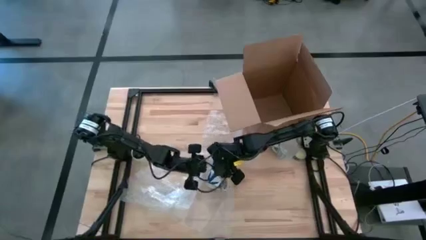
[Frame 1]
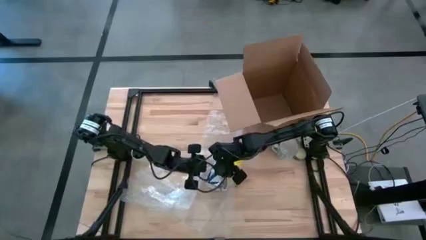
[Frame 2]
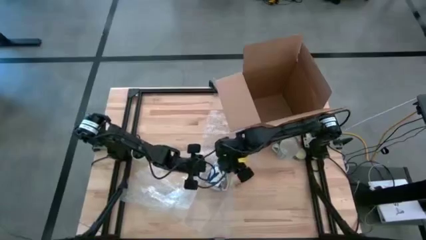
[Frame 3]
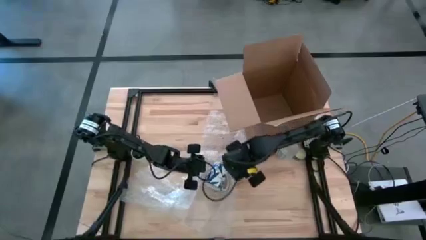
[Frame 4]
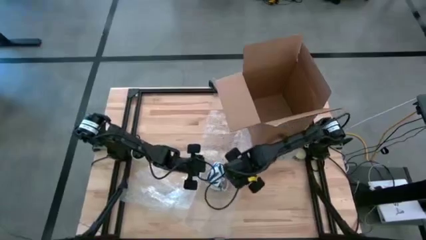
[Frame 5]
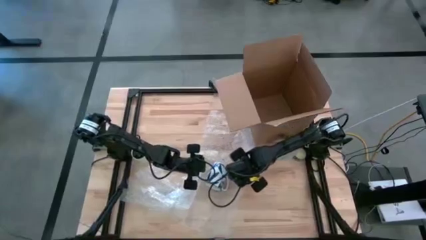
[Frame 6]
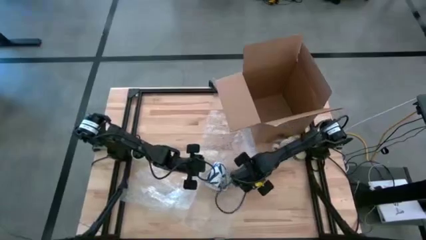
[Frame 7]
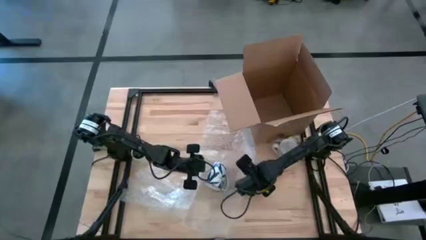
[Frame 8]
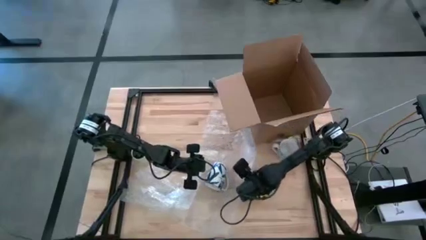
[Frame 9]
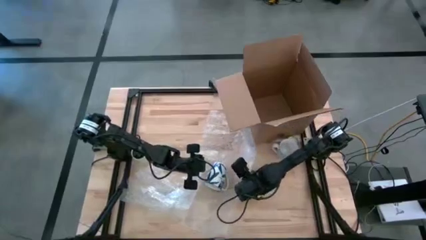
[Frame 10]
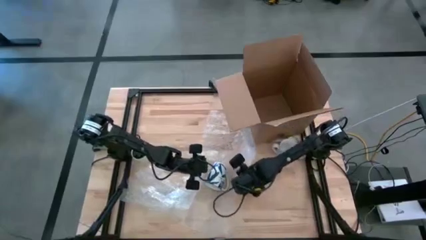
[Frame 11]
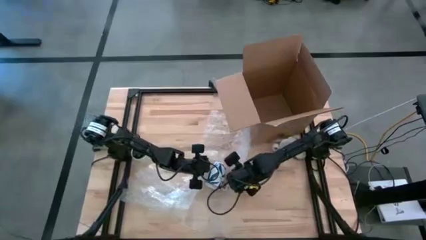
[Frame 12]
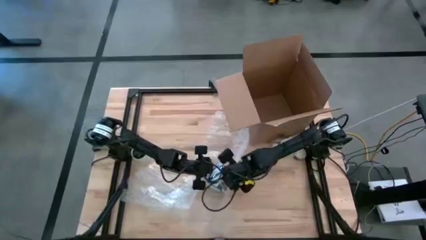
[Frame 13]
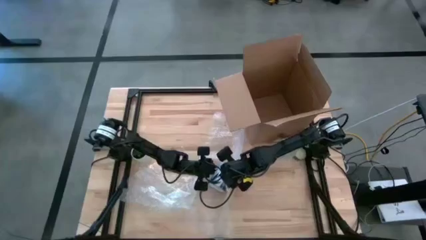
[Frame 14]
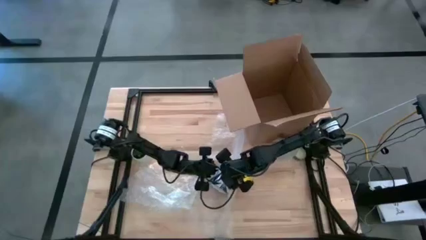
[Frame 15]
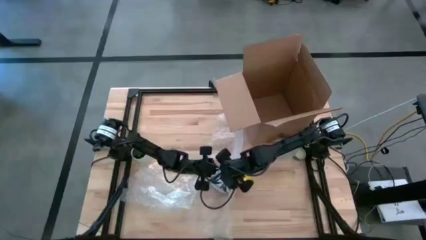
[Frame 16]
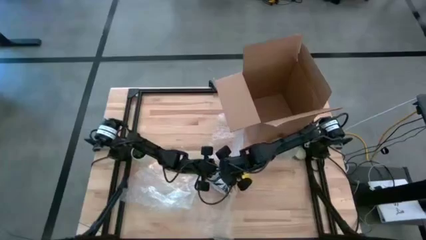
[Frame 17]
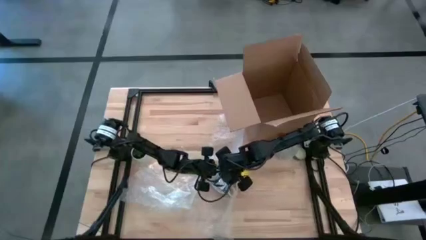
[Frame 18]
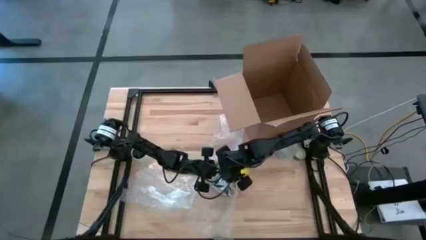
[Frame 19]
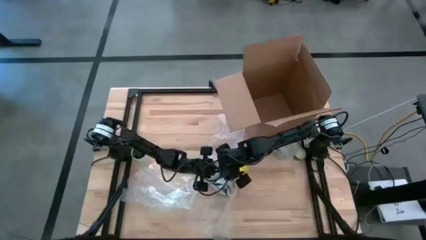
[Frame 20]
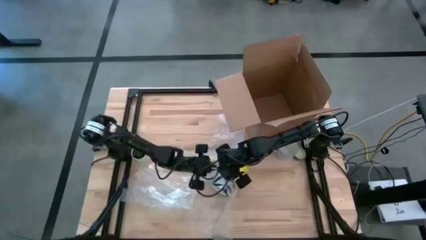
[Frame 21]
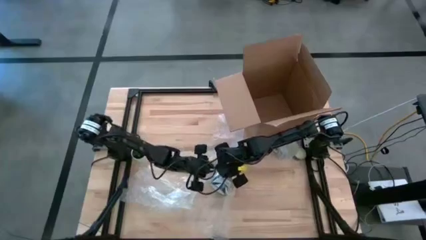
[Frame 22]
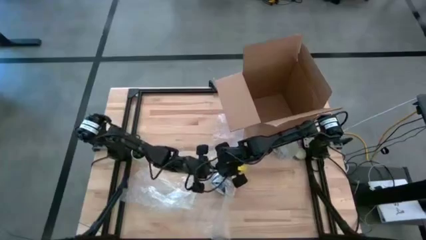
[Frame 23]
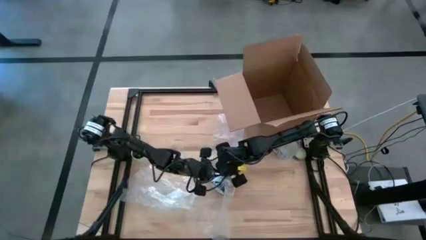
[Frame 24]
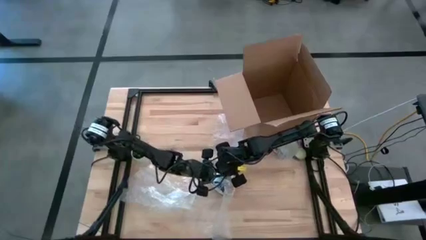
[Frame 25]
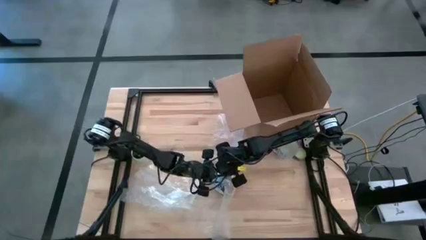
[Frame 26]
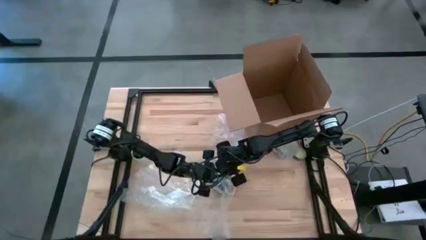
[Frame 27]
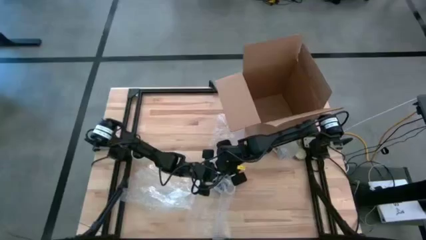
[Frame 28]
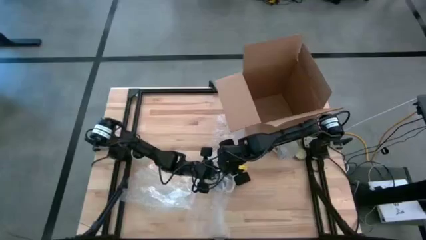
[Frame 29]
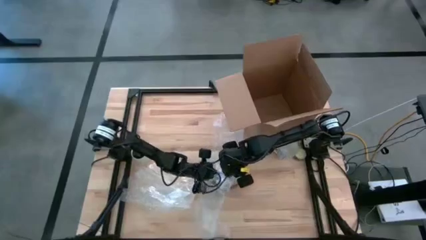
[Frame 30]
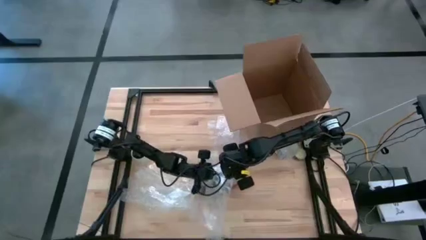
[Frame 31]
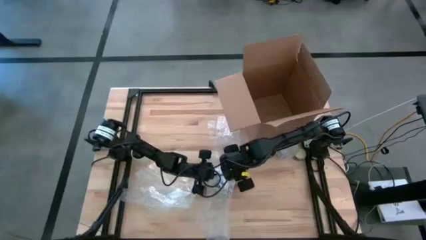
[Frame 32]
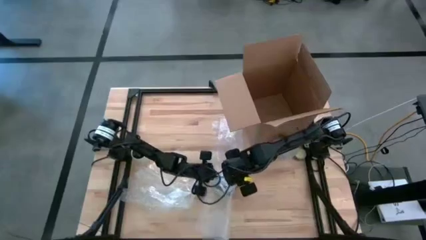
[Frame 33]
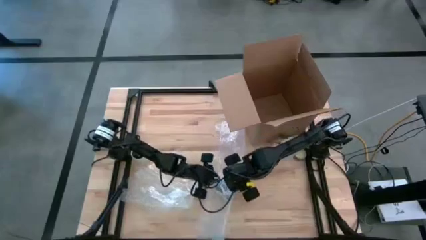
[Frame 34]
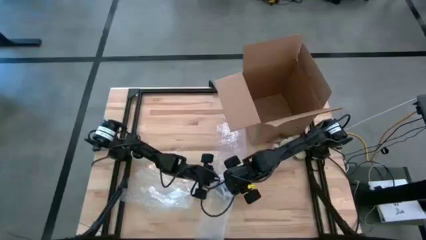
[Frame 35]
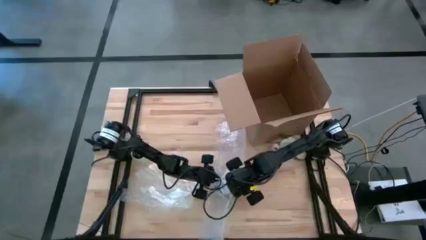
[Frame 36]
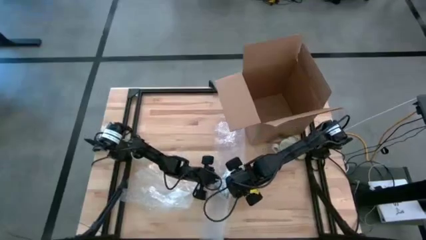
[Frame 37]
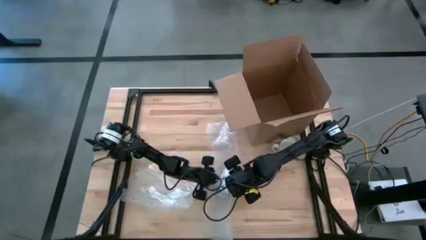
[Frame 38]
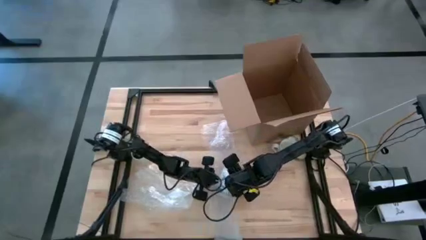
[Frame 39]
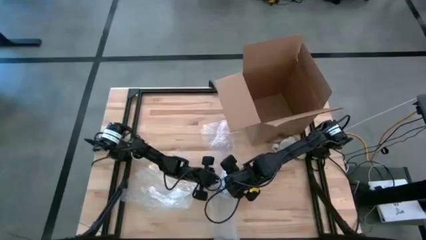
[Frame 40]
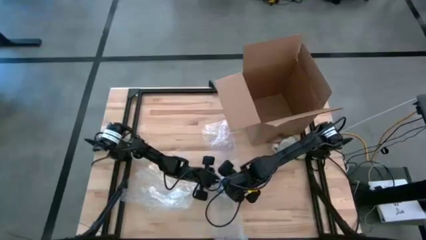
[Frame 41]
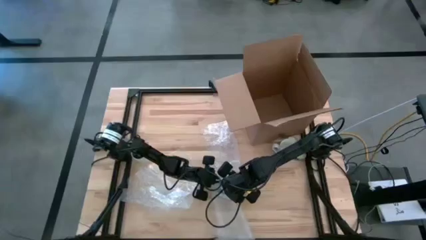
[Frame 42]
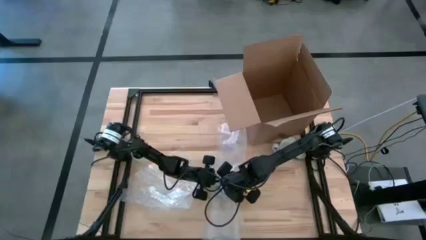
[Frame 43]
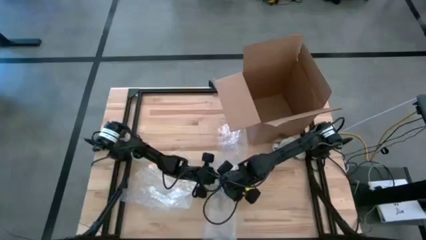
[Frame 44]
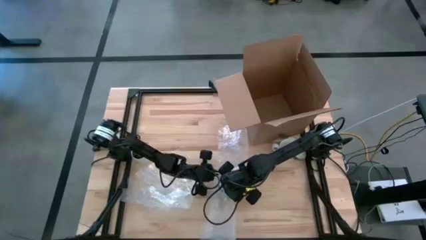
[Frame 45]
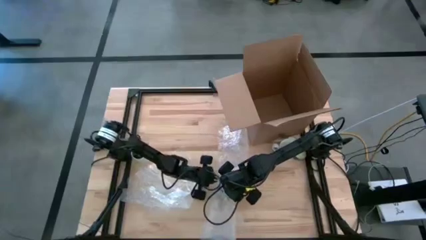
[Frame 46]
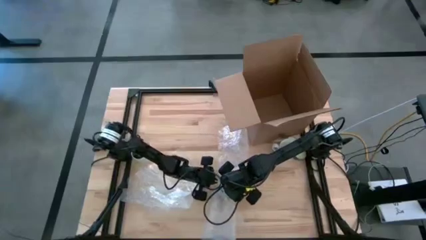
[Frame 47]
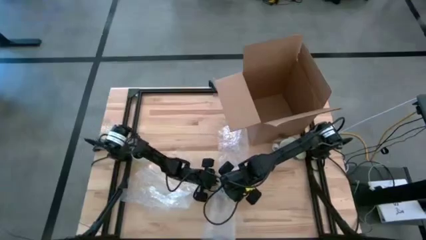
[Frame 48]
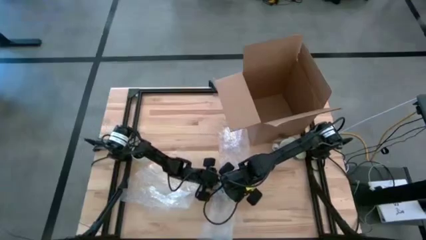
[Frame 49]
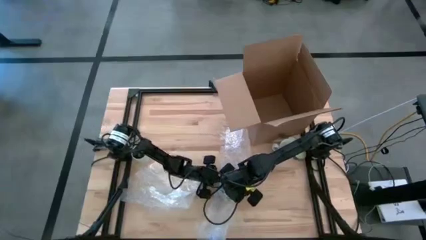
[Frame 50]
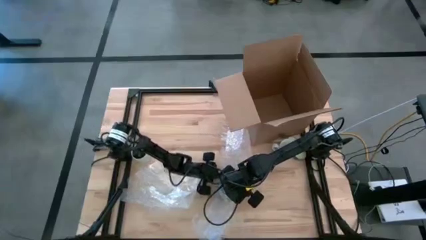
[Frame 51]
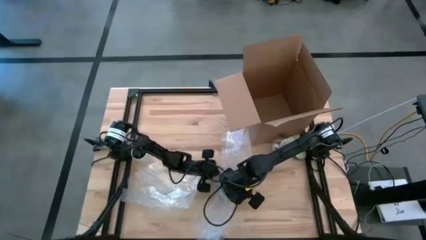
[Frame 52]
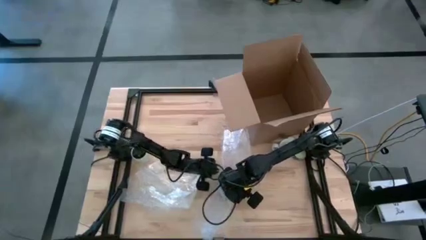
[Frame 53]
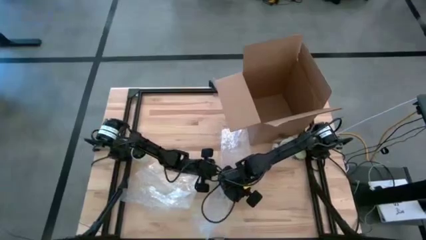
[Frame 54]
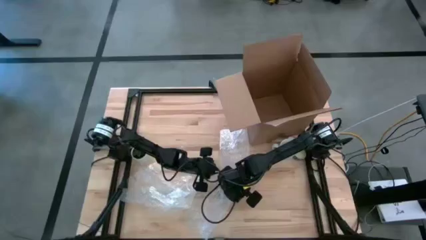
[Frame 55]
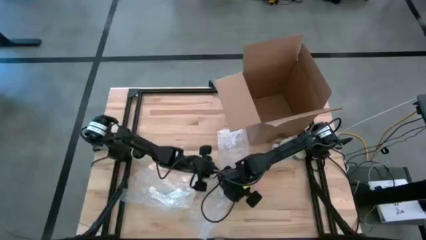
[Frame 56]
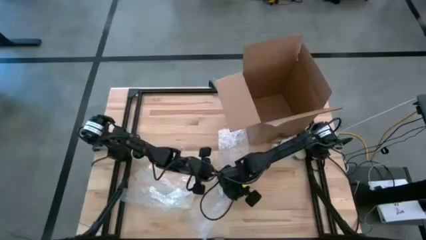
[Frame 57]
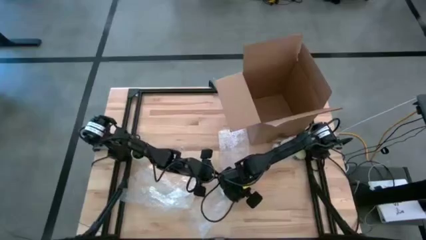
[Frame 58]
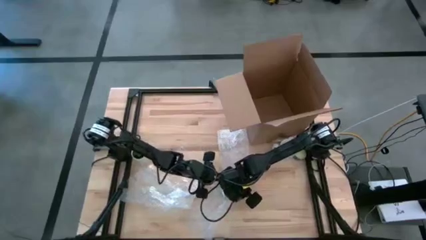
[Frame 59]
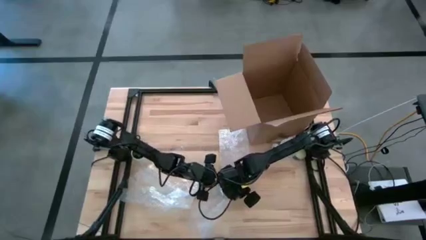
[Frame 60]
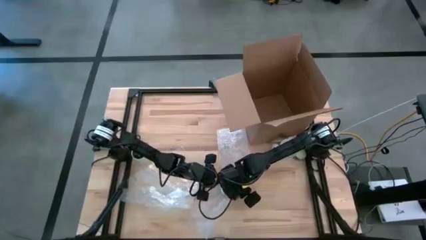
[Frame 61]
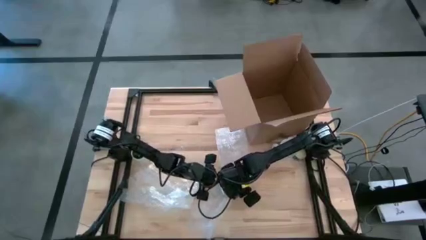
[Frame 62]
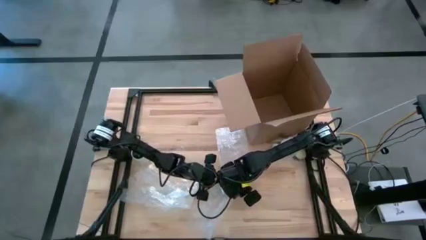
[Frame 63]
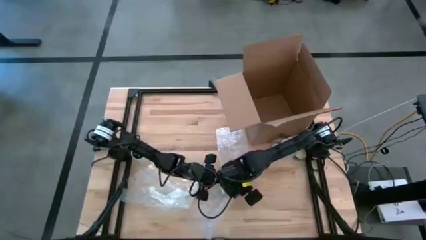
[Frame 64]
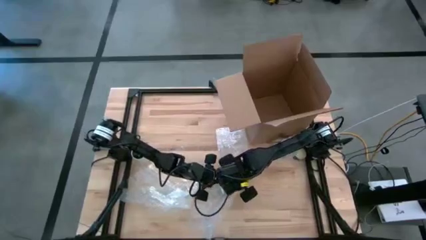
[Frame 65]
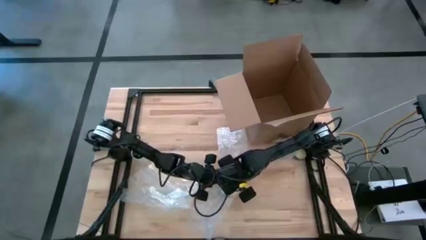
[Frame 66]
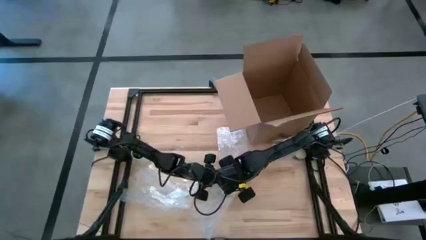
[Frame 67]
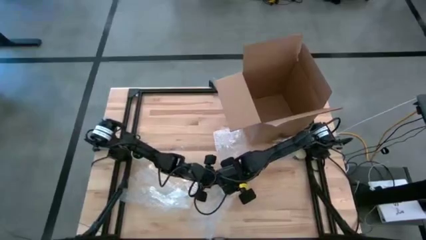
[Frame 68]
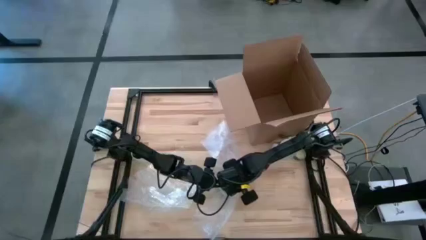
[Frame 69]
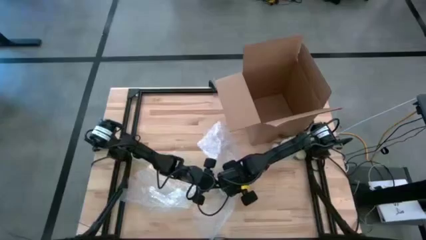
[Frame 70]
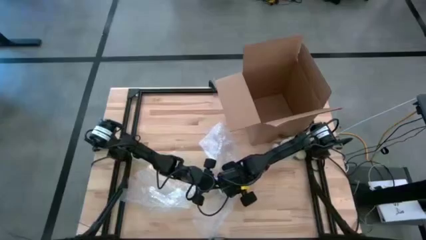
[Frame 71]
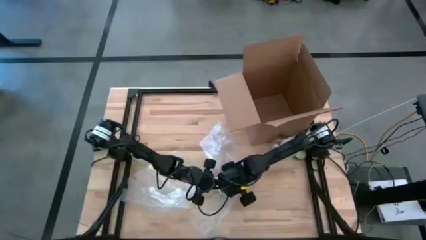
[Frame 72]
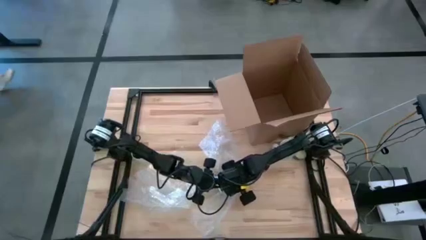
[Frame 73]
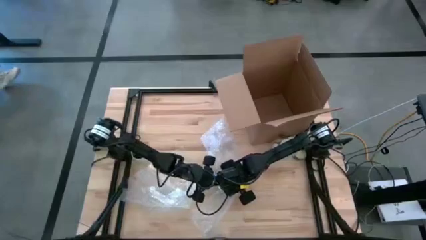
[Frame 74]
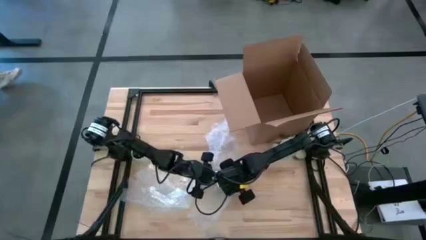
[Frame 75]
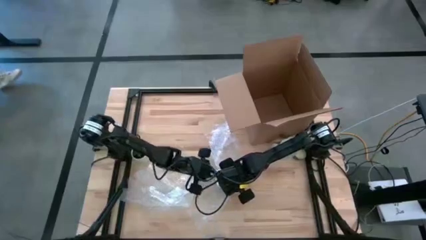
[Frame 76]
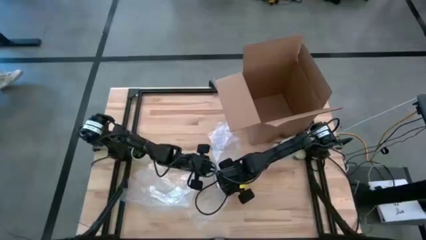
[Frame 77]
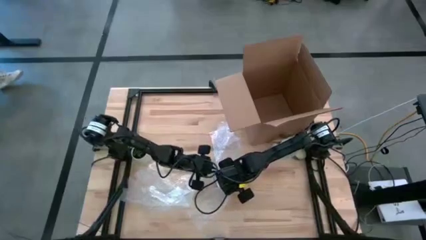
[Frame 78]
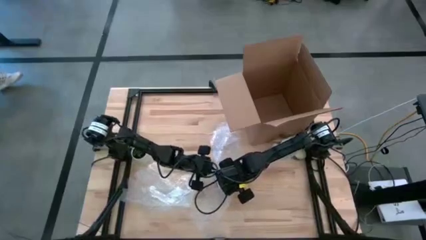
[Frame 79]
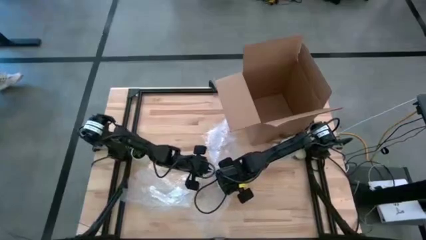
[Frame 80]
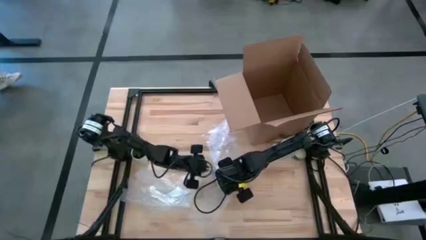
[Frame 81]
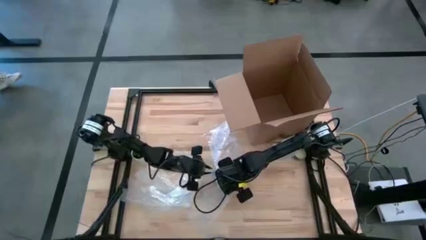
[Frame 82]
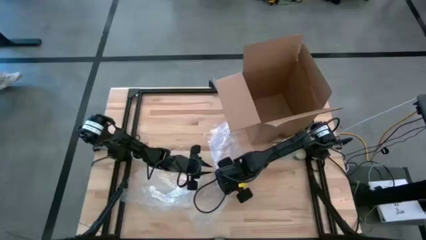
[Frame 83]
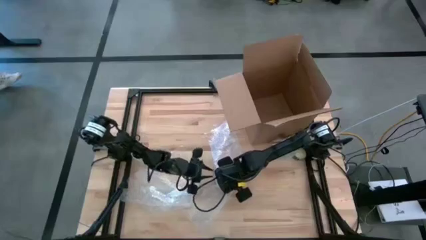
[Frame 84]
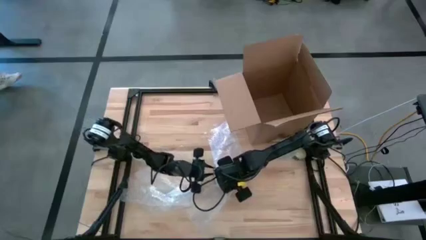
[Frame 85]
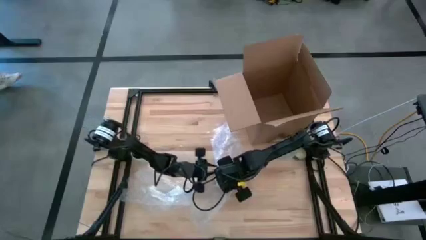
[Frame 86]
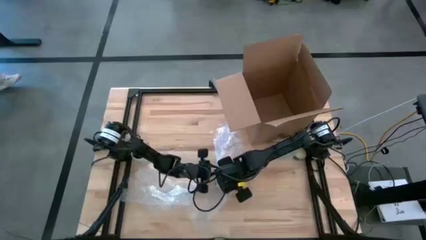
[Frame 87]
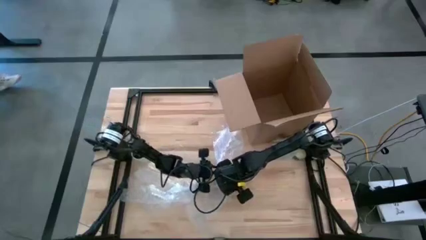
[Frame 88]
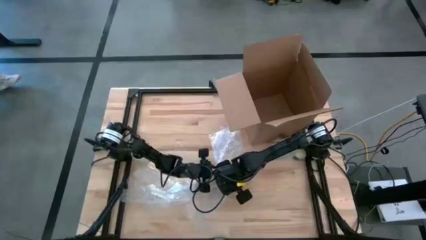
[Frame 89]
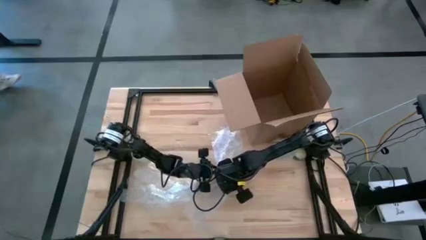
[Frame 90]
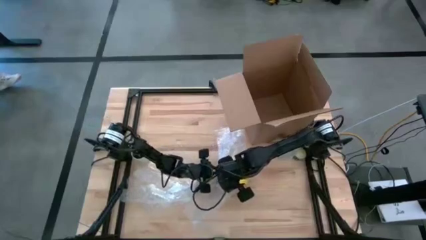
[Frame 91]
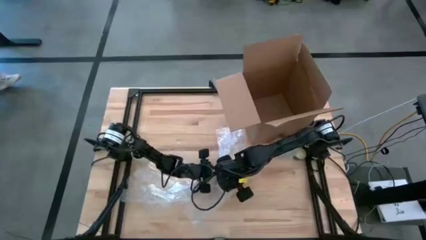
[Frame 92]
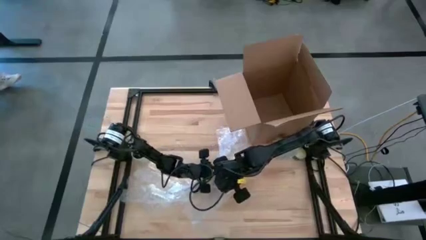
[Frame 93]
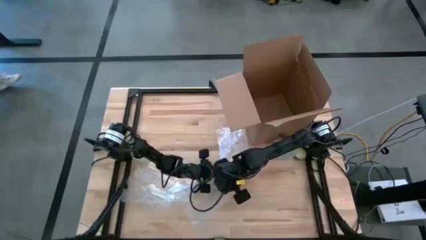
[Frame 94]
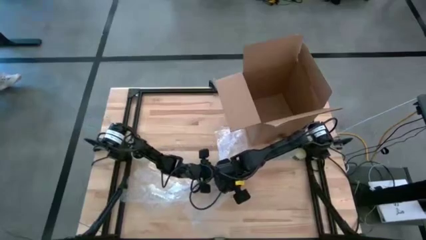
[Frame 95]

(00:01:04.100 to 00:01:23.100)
Task: wrap mug
Wrap the blue mug with the right bubble wrap
